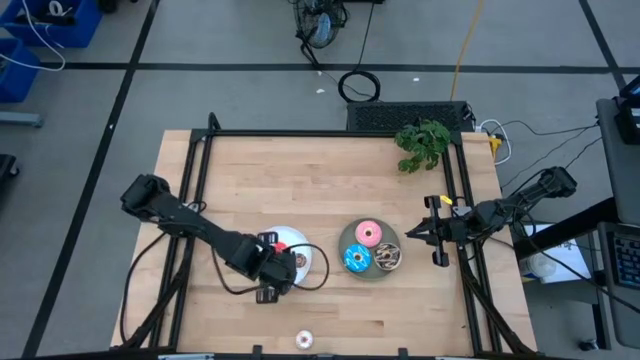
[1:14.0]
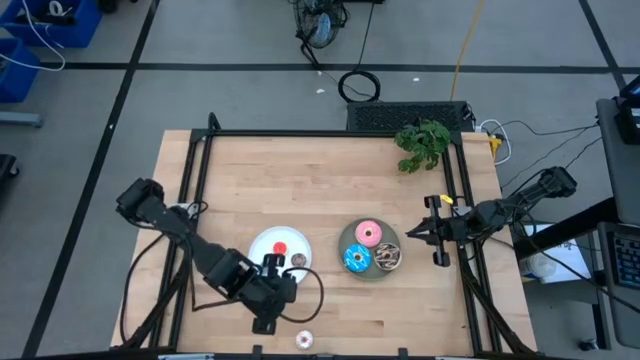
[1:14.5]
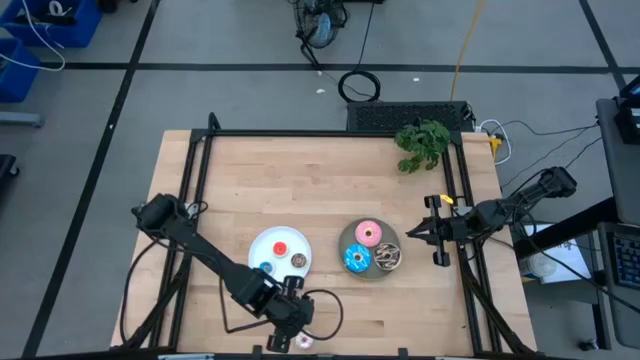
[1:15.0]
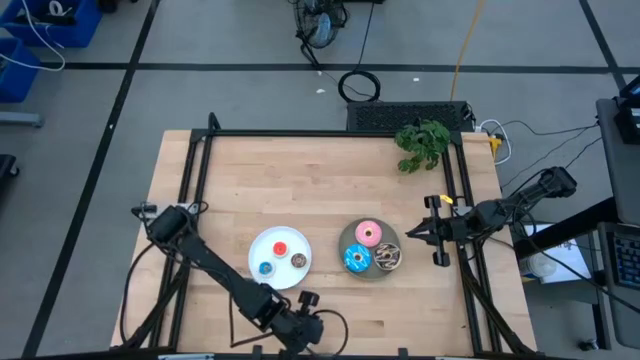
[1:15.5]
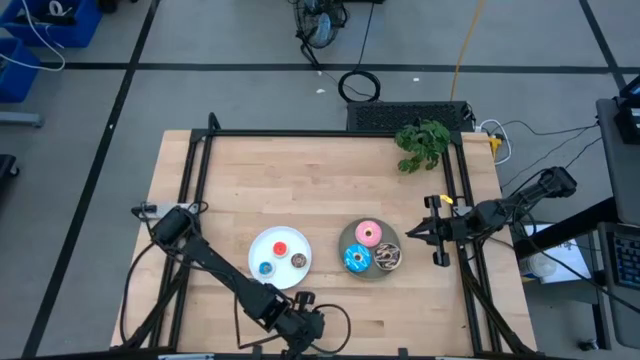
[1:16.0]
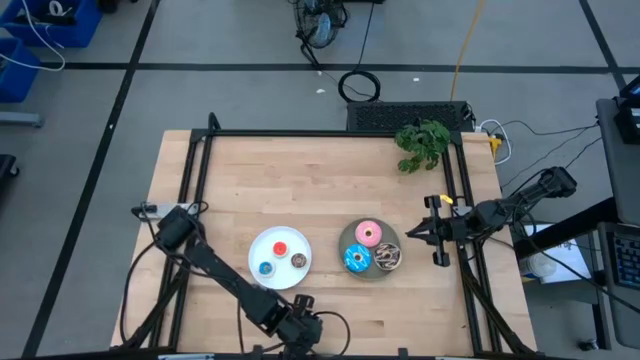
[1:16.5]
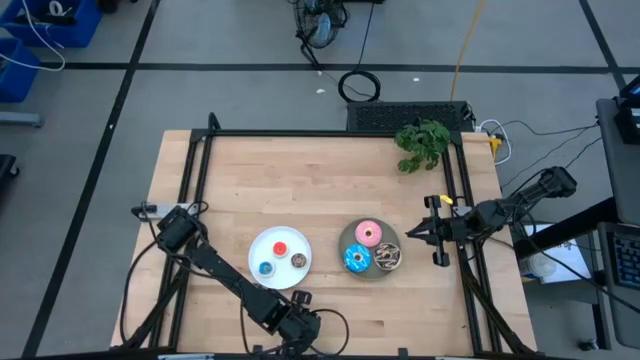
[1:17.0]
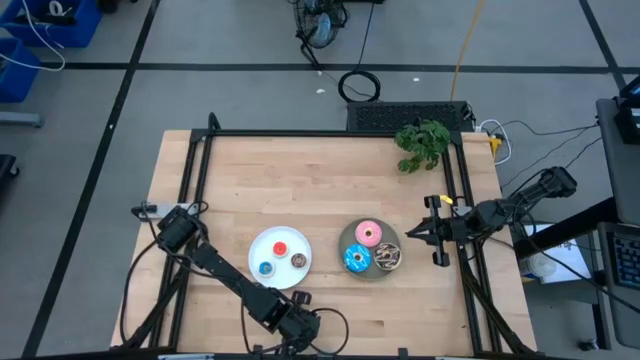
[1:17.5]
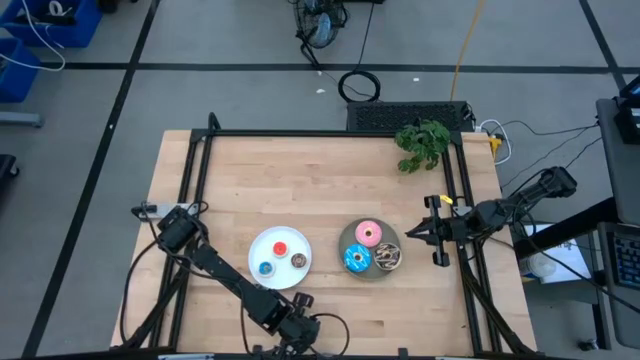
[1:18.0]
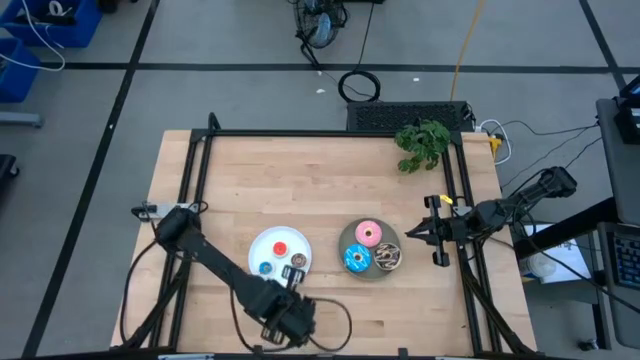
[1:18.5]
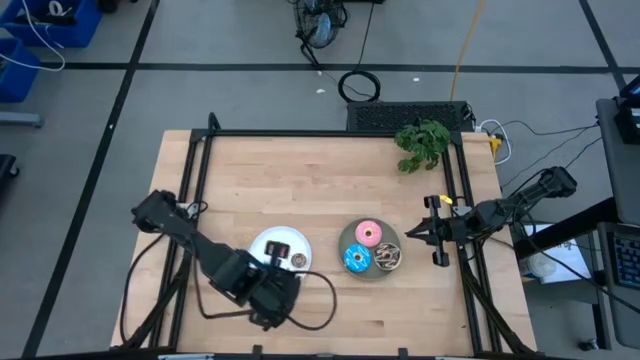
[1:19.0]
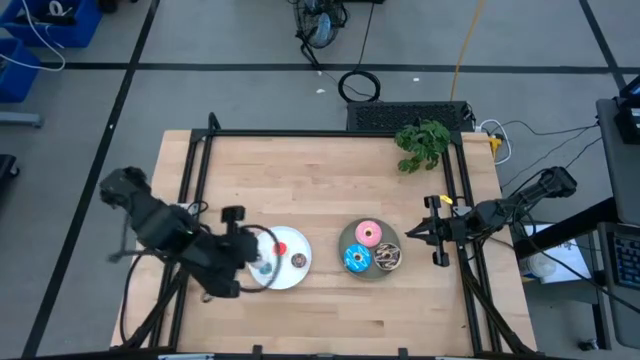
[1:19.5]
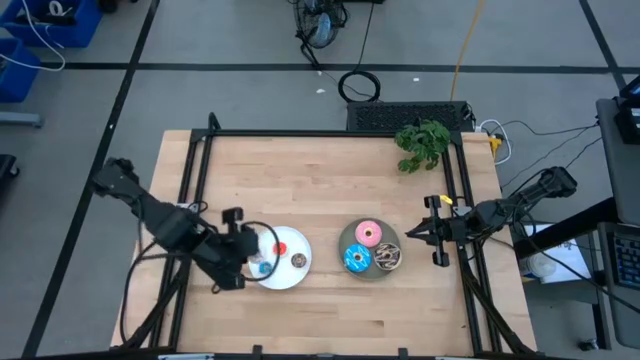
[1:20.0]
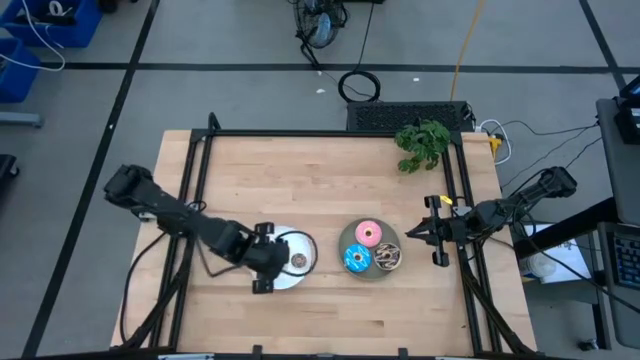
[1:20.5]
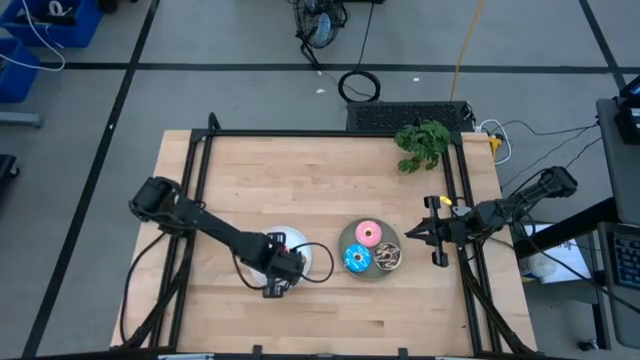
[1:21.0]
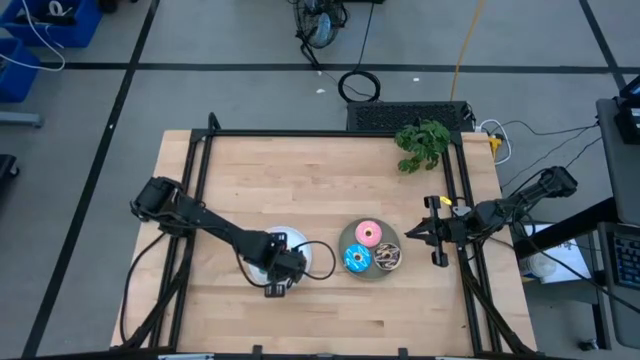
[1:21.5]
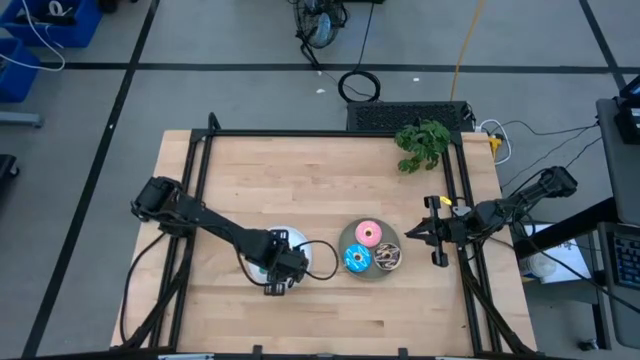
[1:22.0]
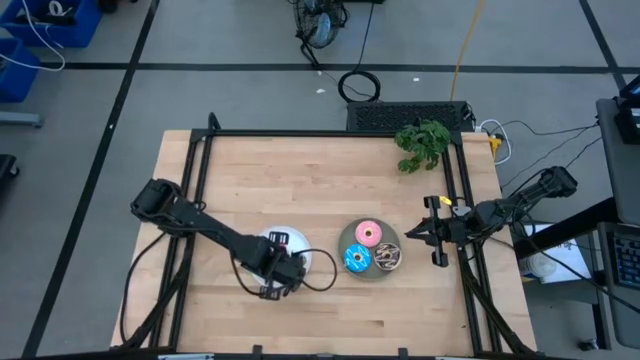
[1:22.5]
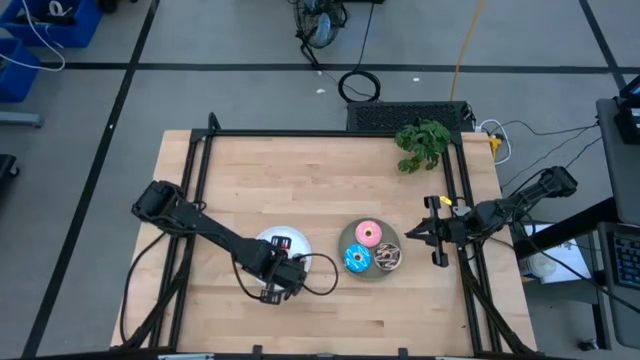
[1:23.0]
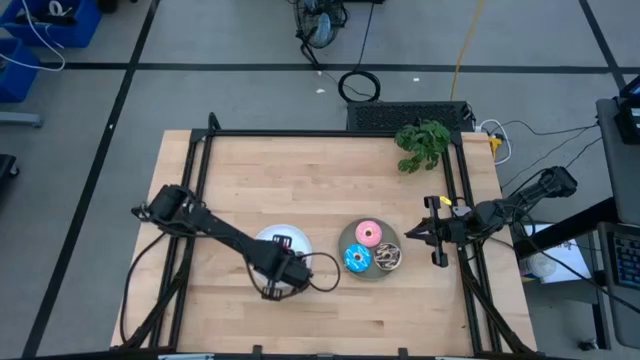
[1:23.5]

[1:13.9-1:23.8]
Task: Pick & Place donuts
Put the small white donut on the white plate

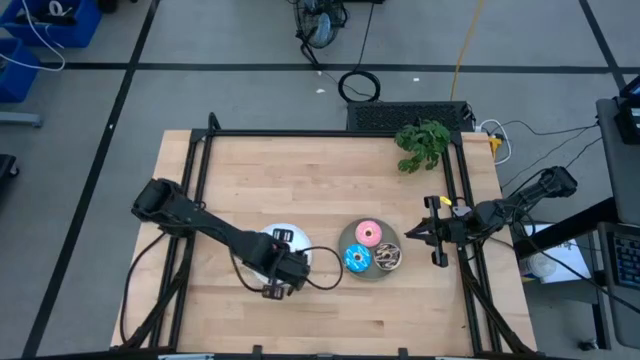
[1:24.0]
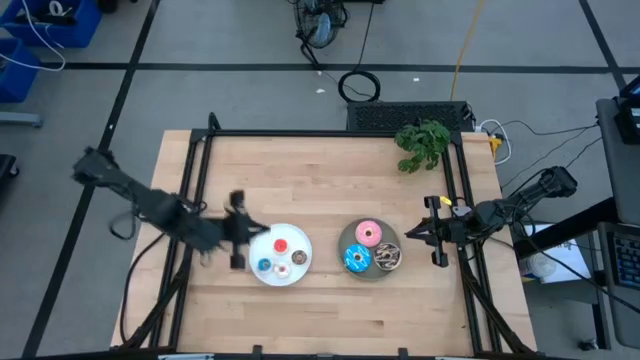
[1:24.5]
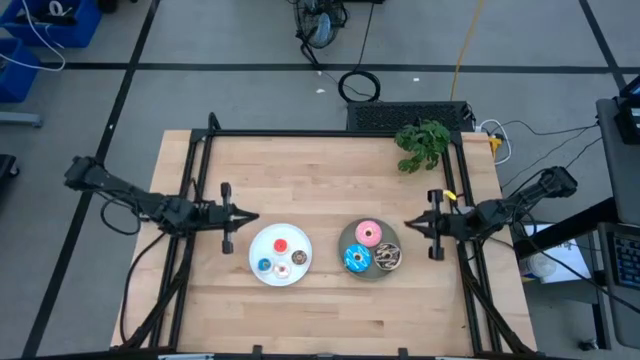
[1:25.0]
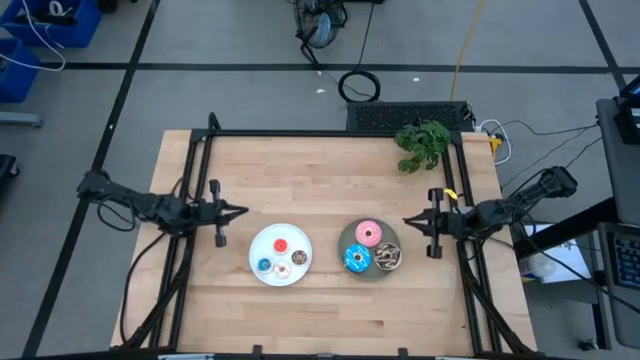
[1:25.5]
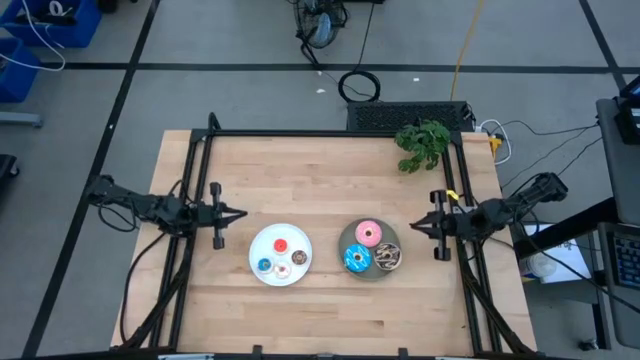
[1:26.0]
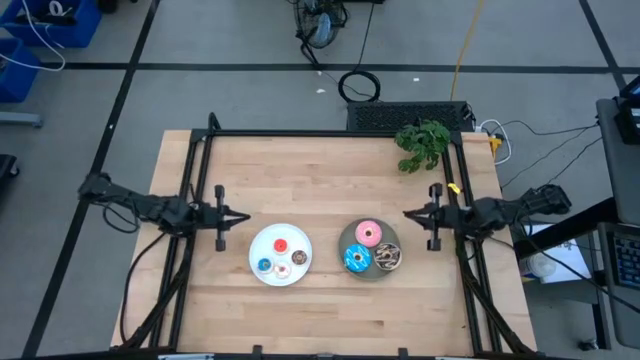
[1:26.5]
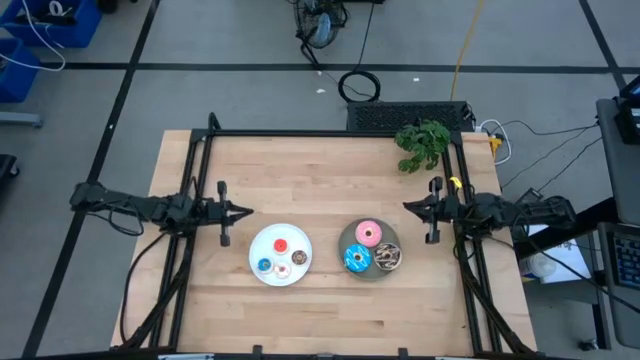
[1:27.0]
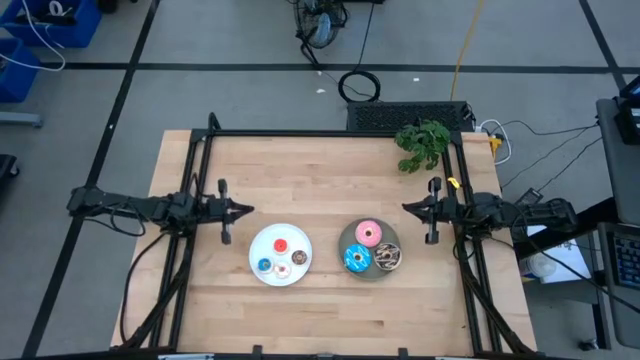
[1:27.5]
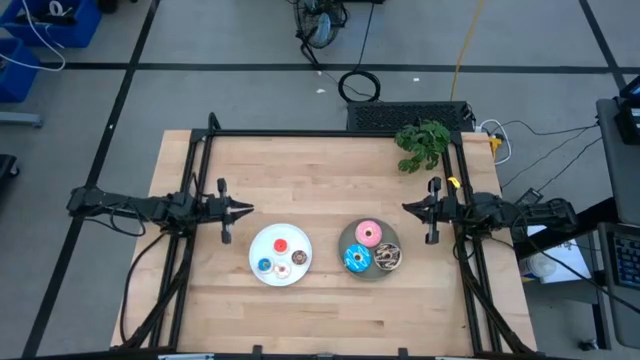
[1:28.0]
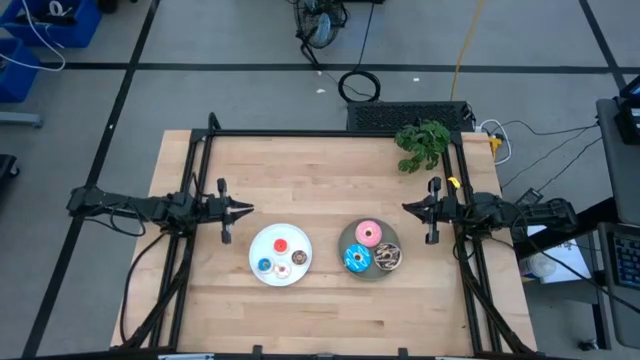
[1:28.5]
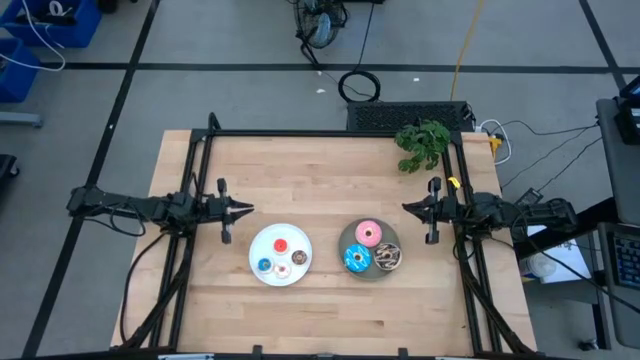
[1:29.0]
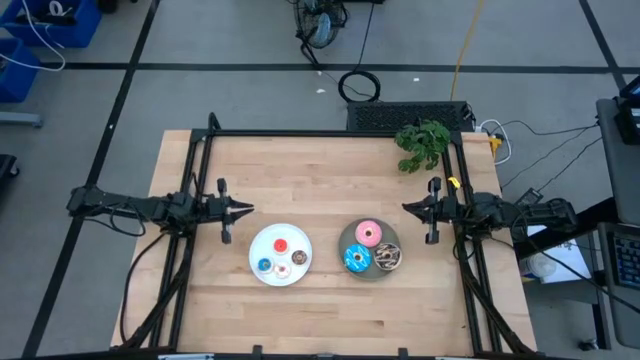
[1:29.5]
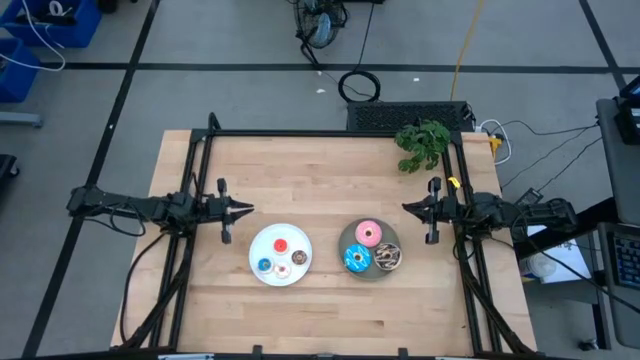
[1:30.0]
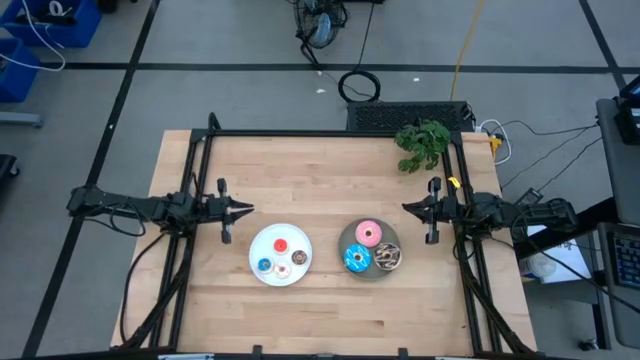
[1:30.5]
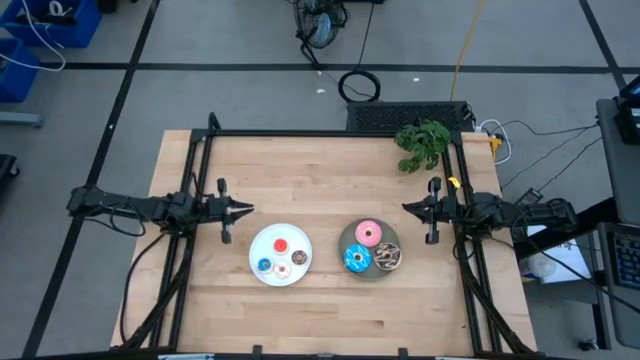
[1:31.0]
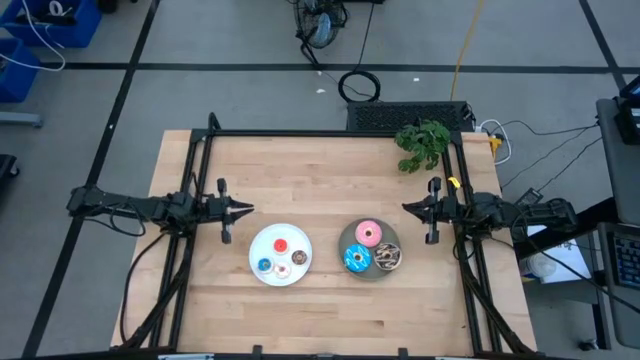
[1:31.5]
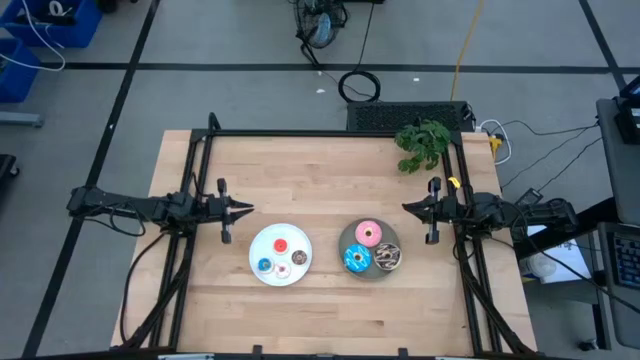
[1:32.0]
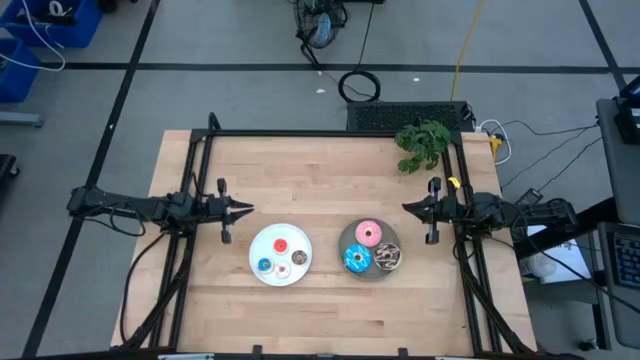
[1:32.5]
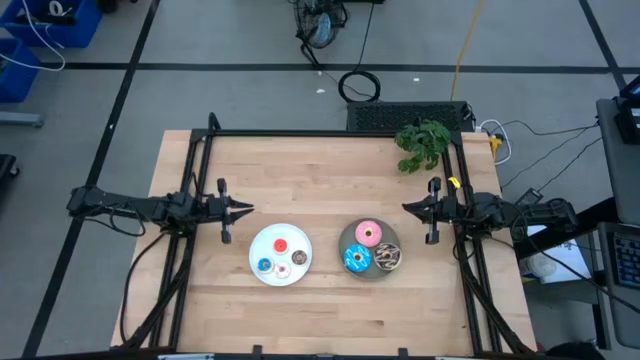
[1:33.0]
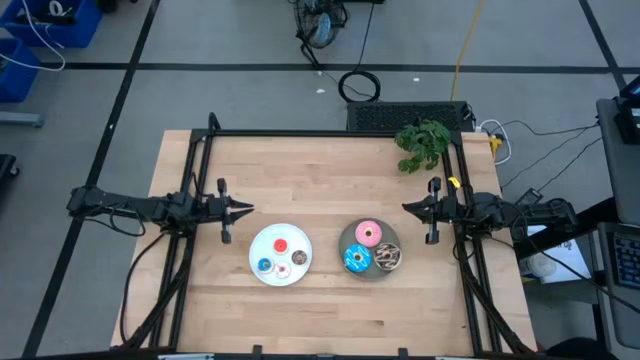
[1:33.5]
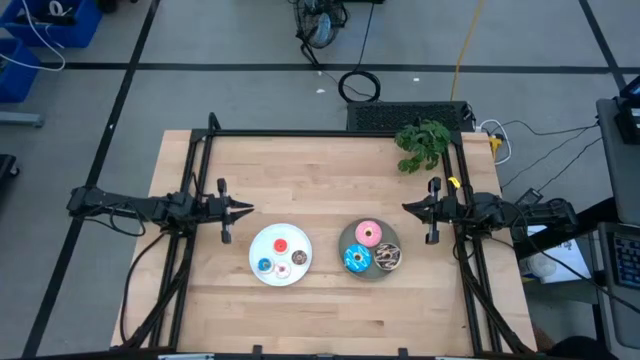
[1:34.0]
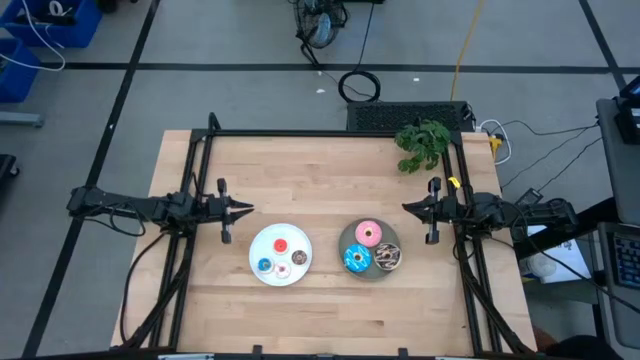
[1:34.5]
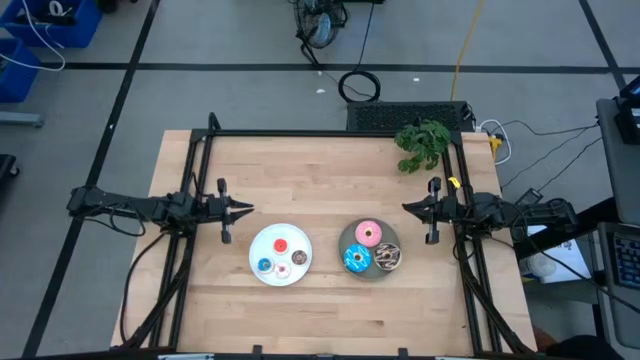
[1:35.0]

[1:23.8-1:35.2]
Return to Home Position
